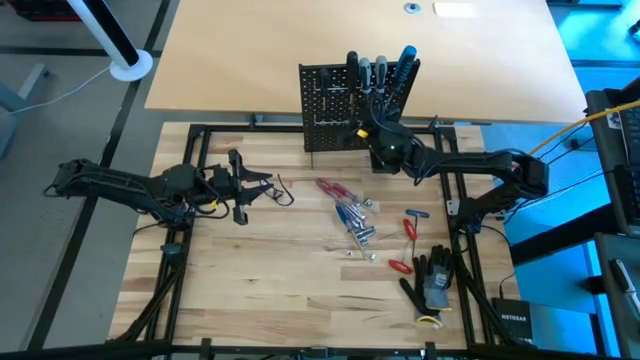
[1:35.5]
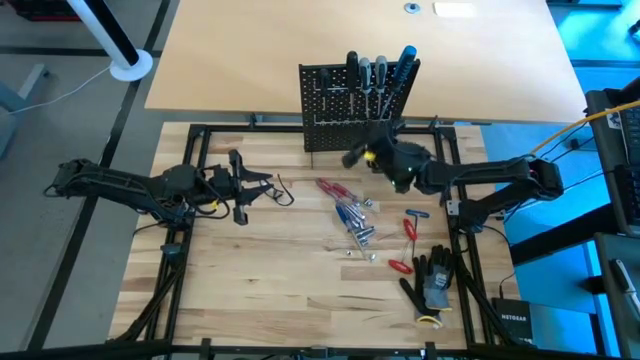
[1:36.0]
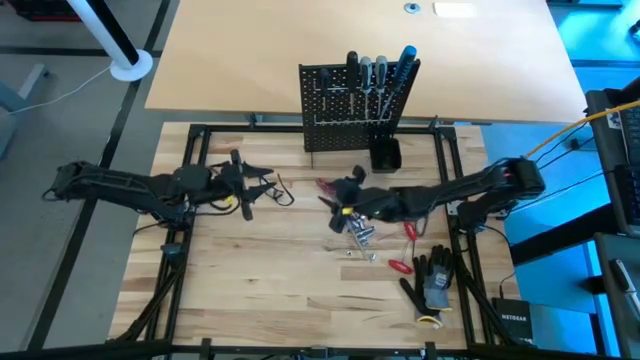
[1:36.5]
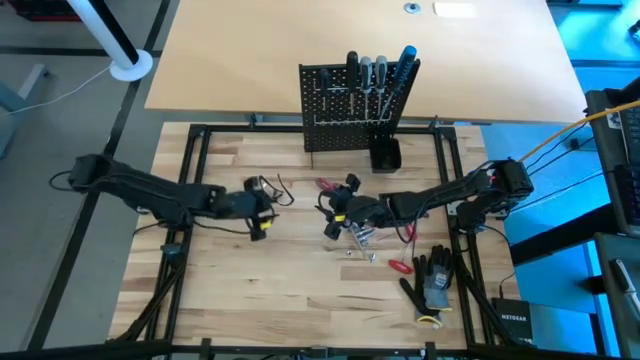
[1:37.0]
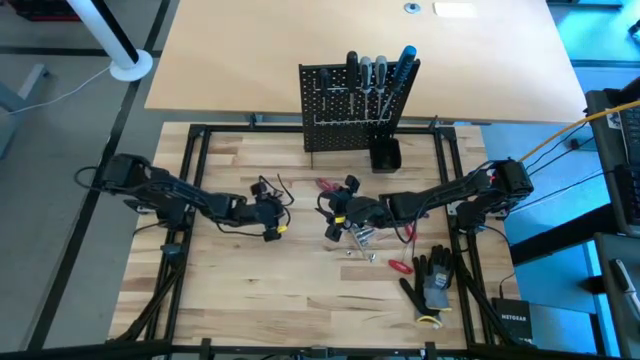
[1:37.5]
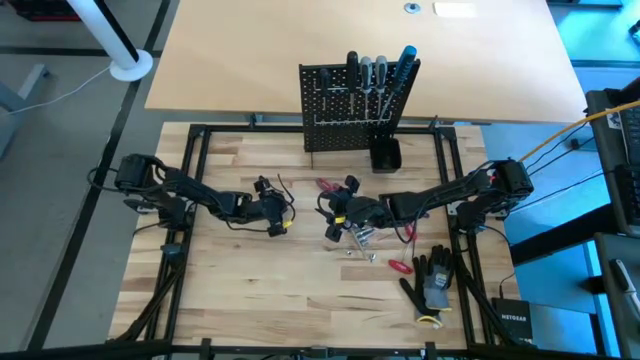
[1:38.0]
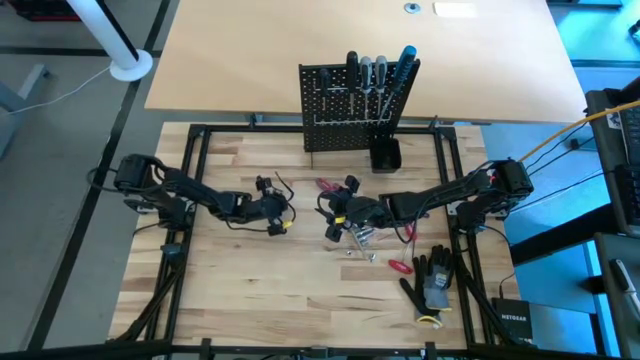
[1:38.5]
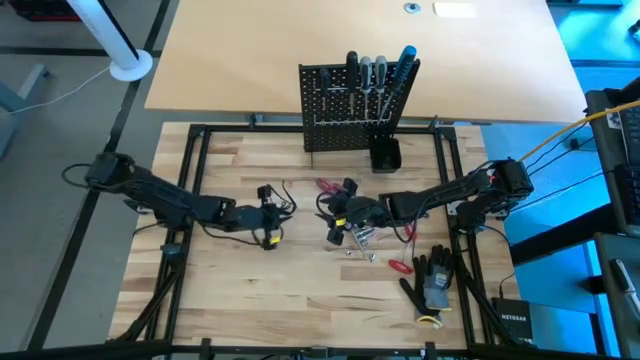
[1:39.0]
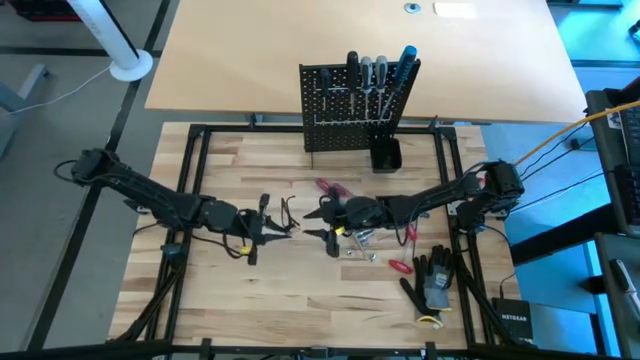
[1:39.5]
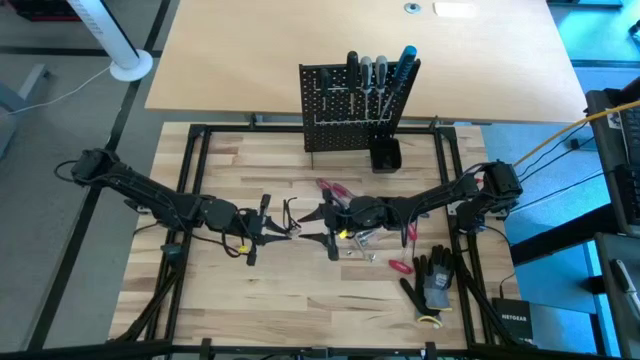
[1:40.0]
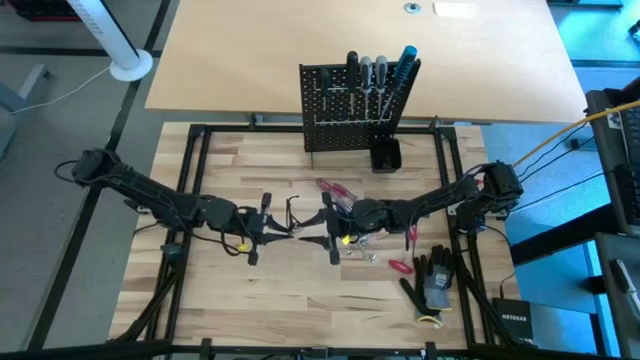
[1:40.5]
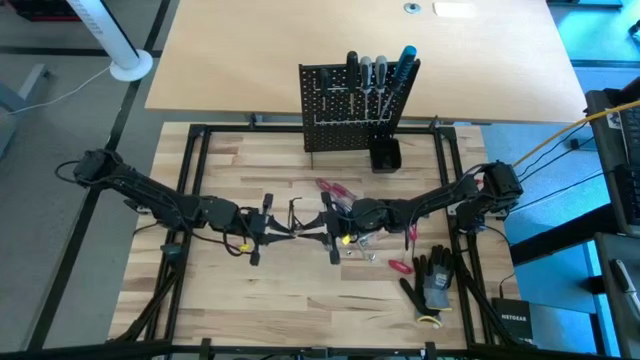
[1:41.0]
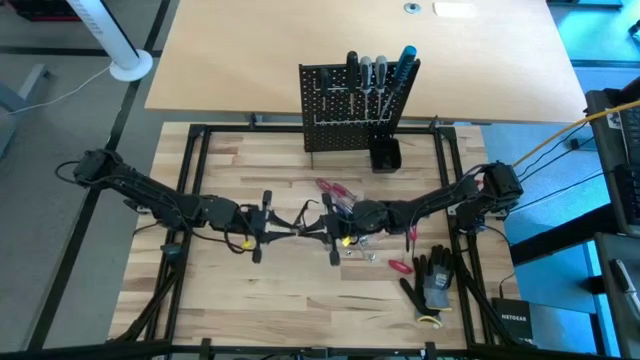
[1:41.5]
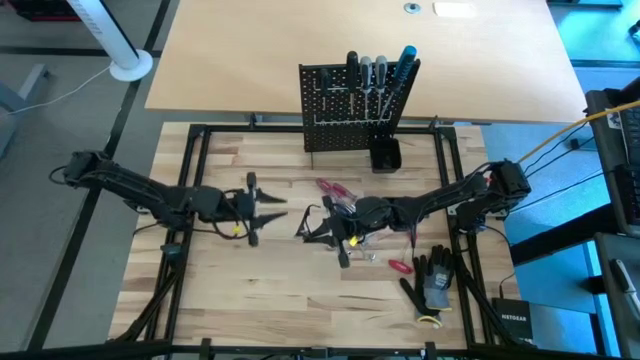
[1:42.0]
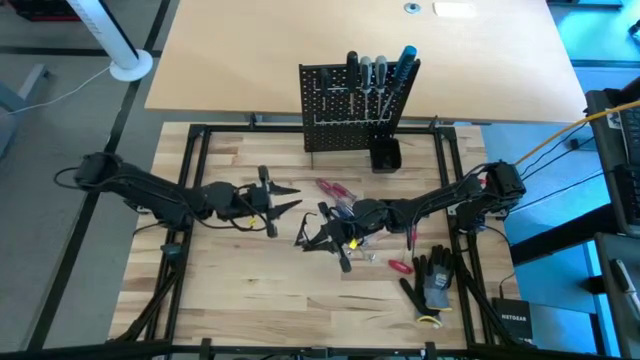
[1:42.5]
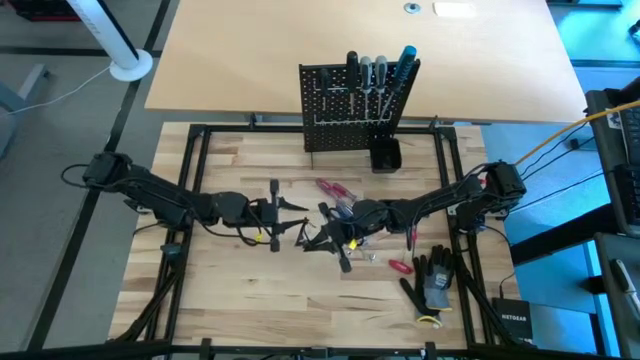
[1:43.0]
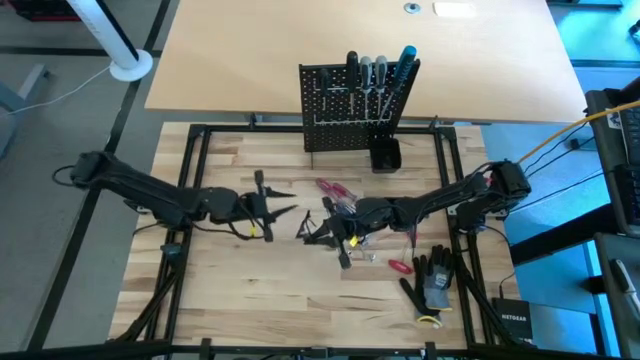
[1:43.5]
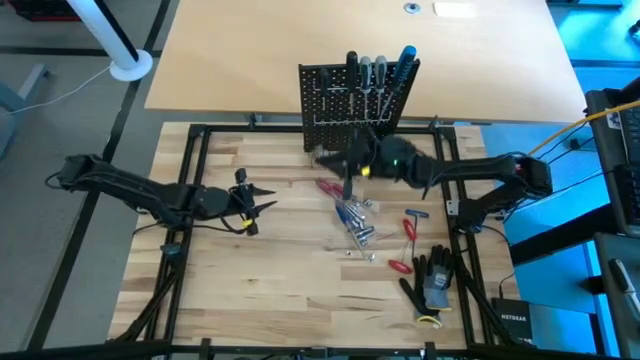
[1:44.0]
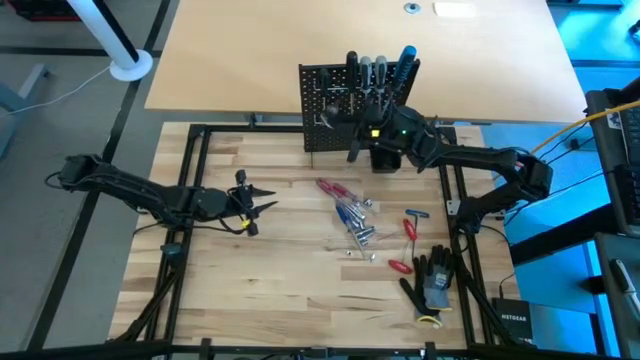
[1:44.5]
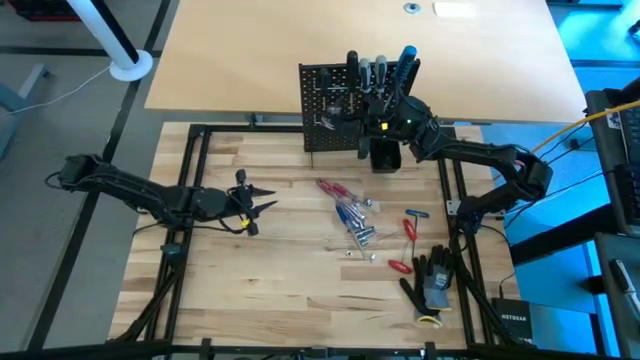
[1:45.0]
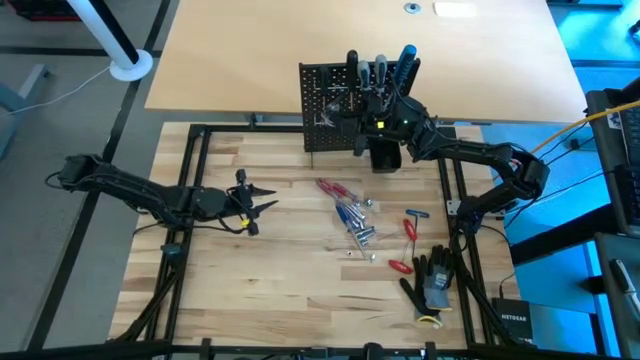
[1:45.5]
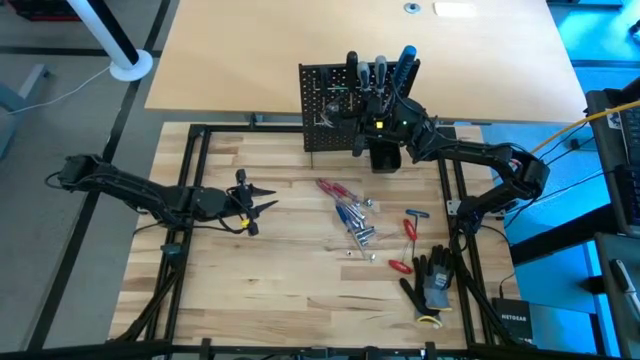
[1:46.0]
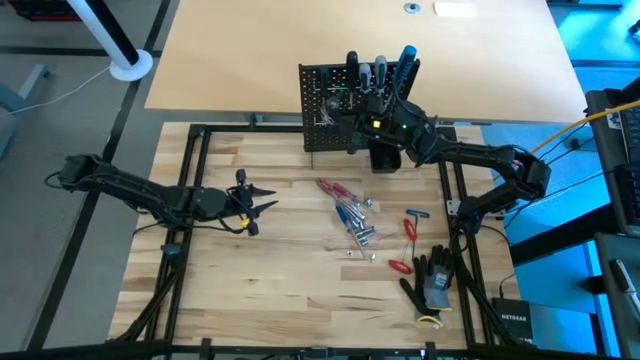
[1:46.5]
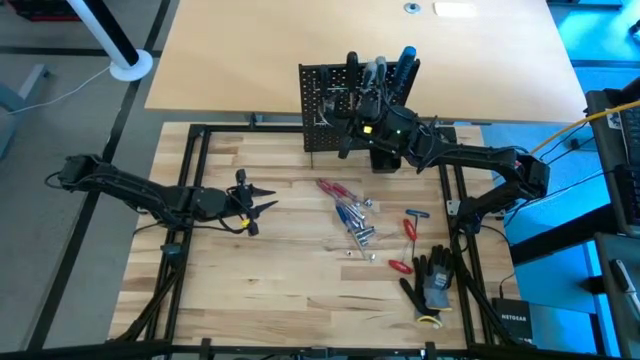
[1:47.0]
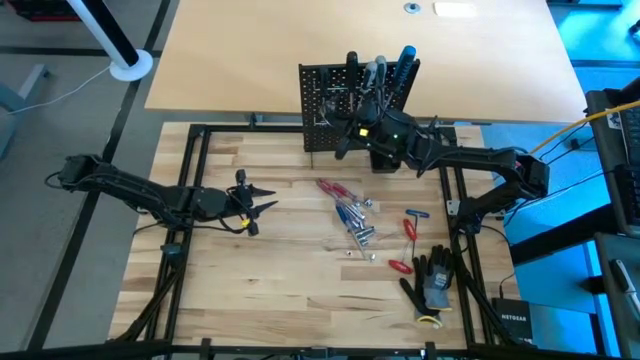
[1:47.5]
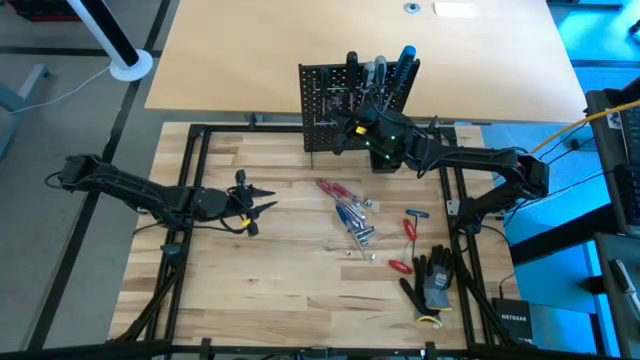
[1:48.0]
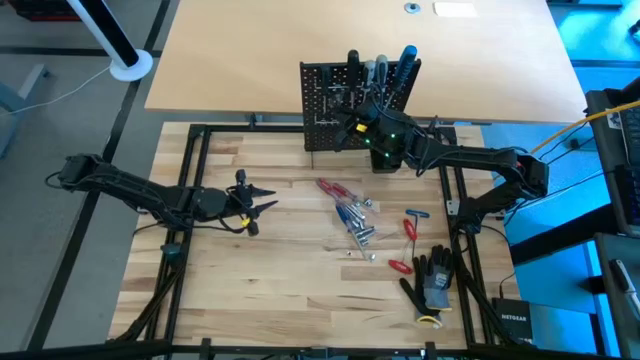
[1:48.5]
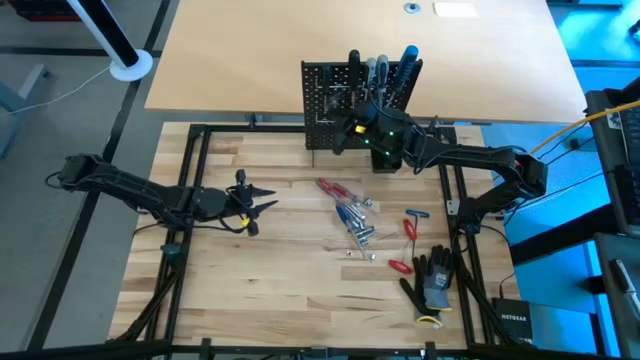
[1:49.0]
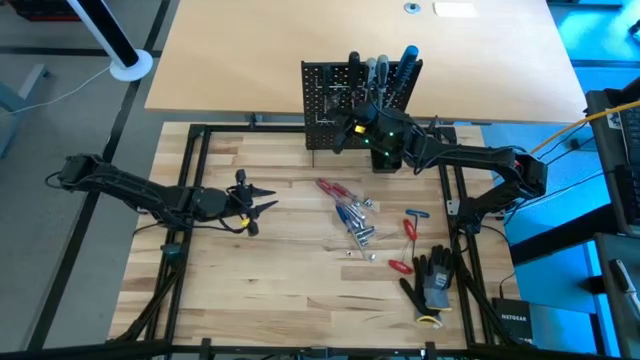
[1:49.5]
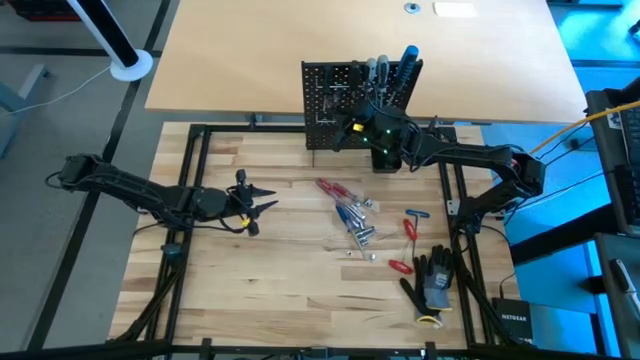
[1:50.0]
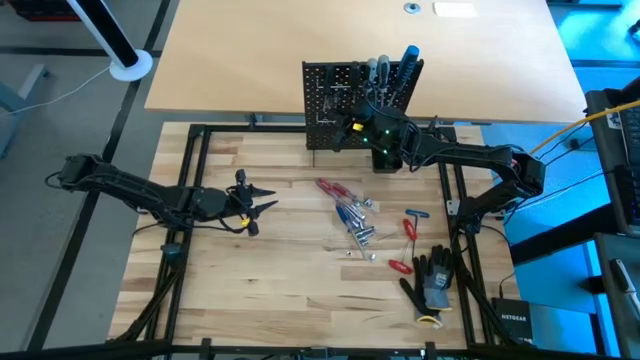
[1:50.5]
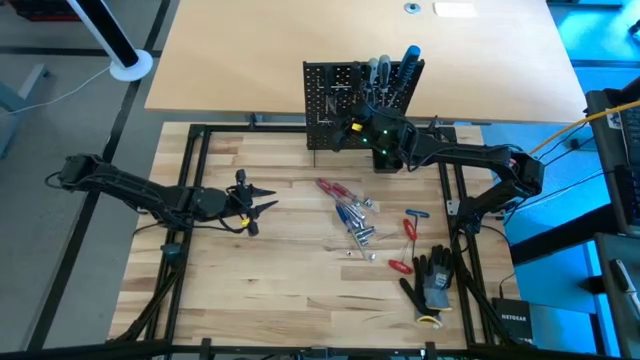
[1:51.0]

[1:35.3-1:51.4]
Task: Hang tools onto peg board
Hang the black safety glasses on the peg board

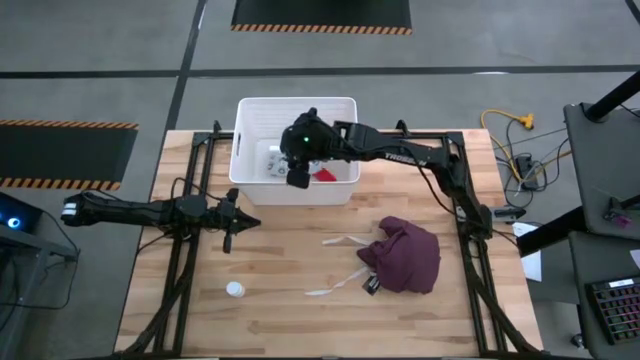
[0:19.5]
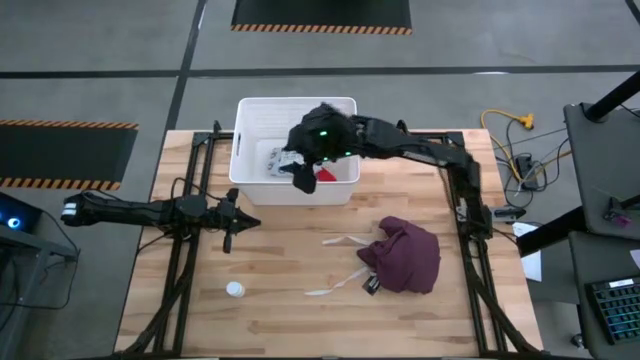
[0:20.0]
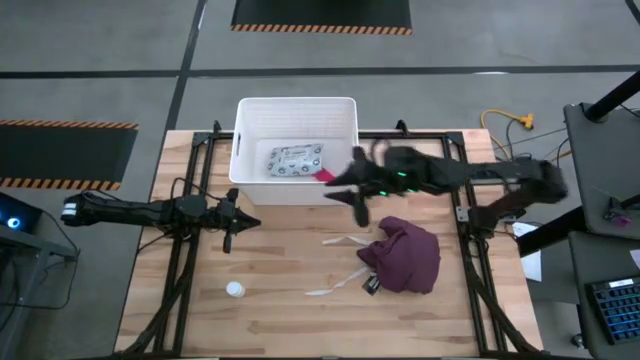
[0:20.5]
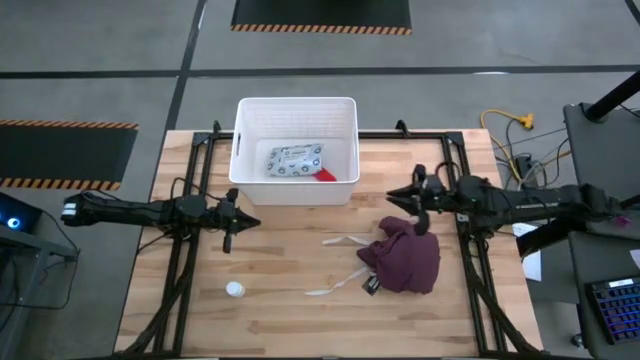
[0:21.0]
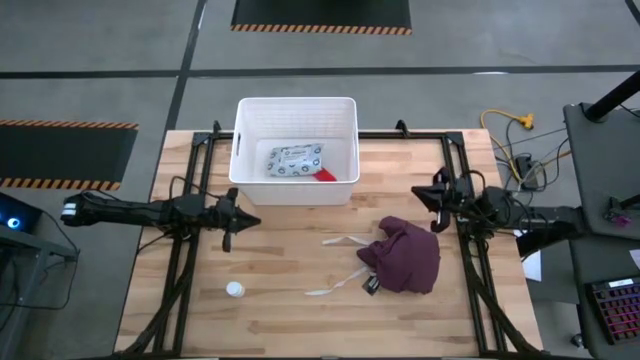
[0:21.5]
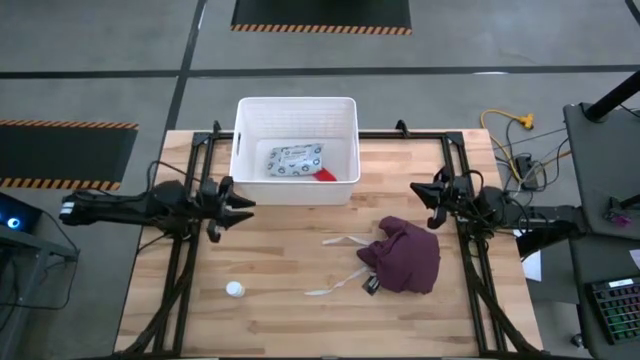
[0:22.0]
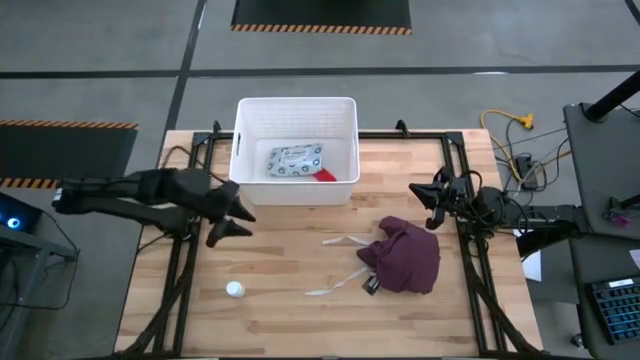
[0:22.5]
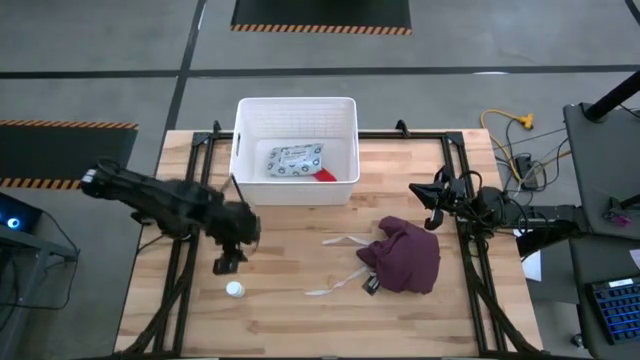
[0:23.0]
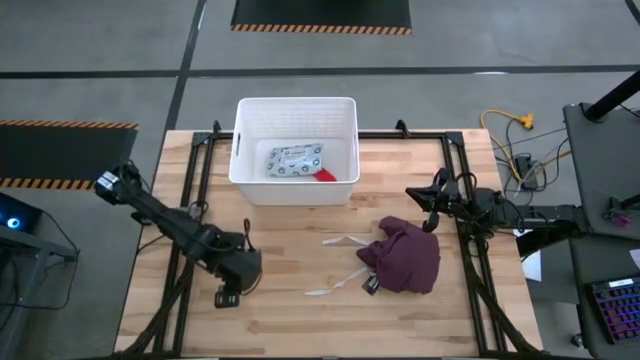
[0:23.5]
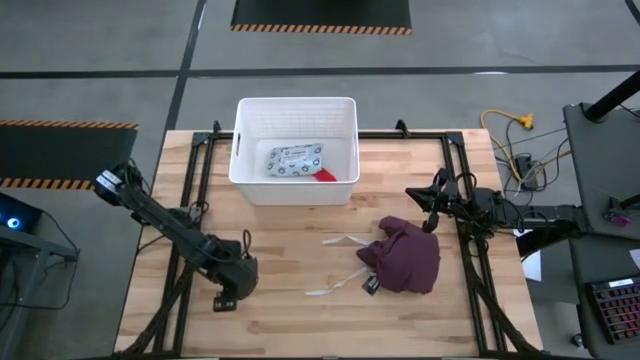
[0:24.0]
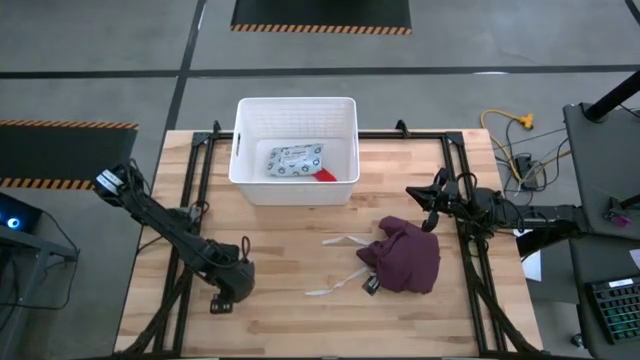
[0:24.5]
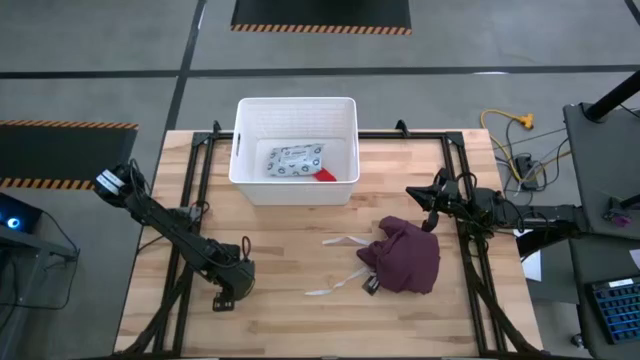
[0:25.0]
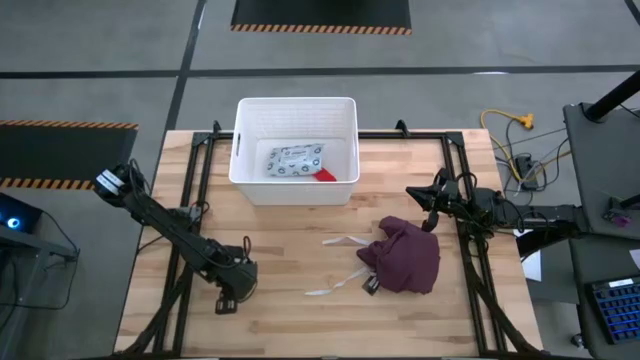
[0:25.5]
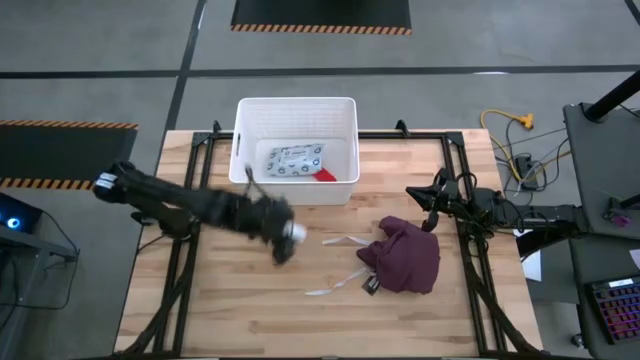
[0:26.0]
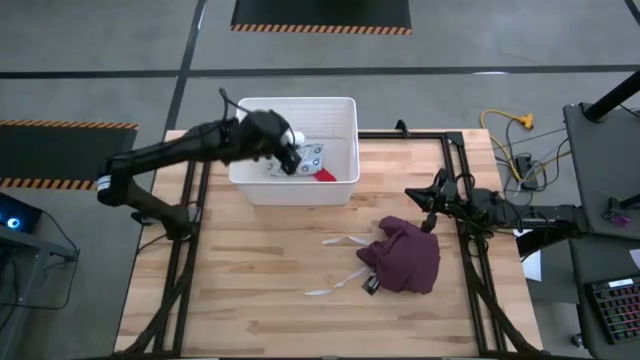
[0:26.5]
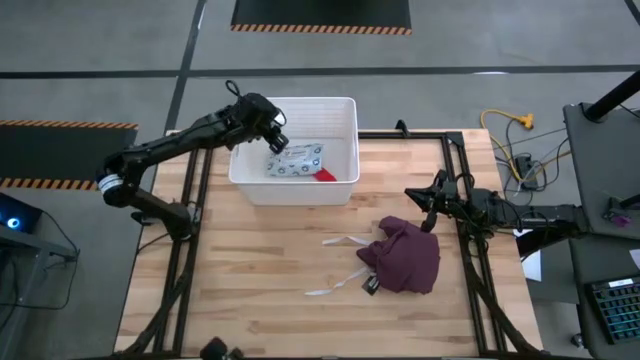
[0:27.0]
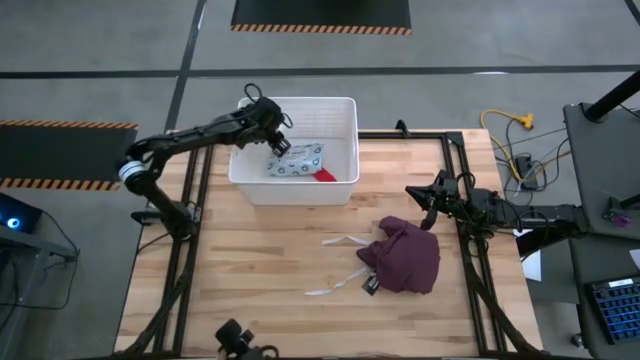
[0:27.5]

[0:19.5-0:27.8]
Task: Pick & place medical supplies in basket/bin
Put the white pill bottle into the white bin
